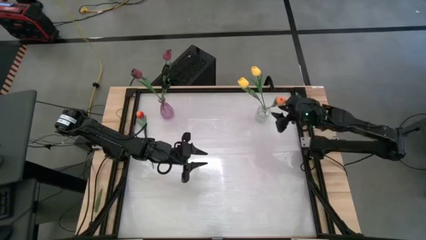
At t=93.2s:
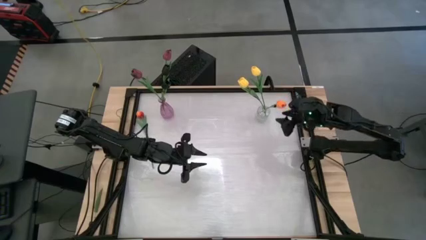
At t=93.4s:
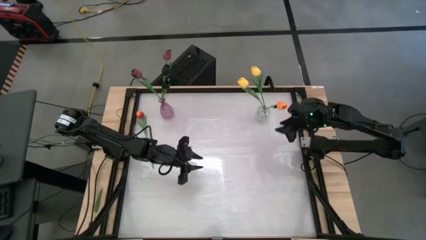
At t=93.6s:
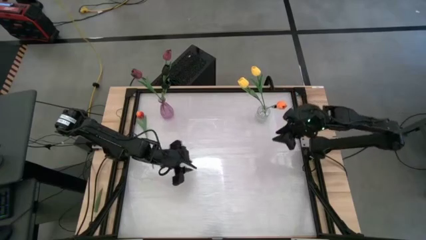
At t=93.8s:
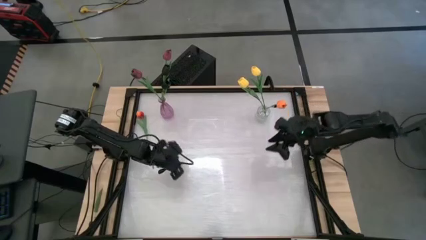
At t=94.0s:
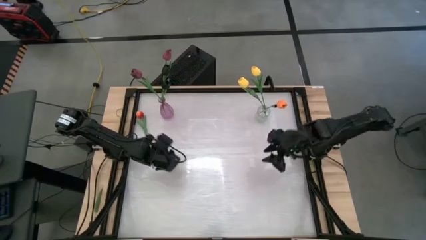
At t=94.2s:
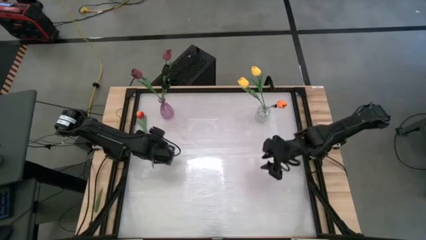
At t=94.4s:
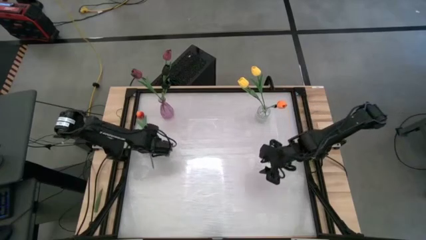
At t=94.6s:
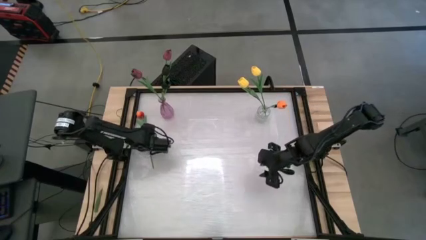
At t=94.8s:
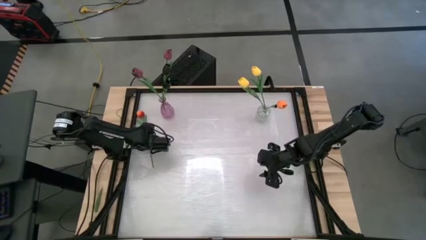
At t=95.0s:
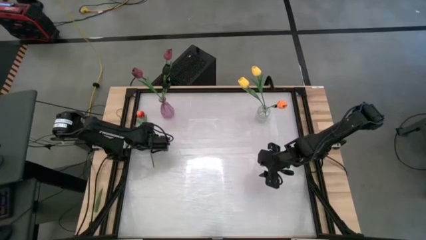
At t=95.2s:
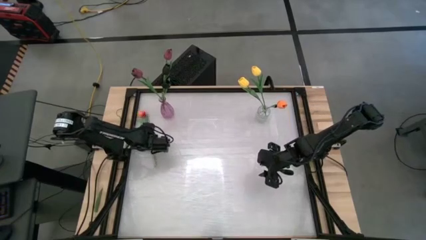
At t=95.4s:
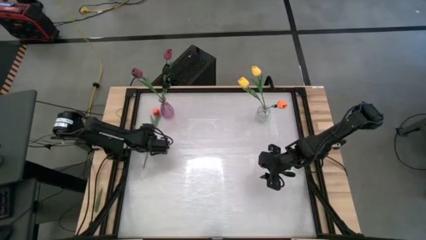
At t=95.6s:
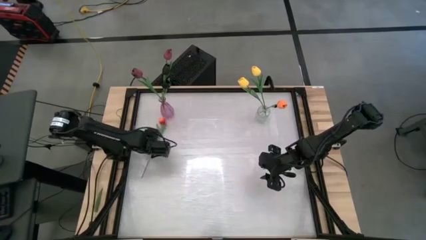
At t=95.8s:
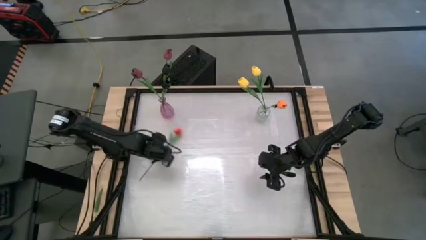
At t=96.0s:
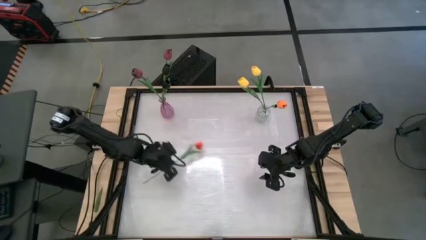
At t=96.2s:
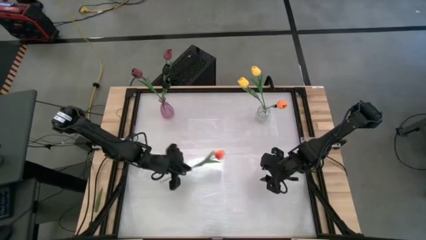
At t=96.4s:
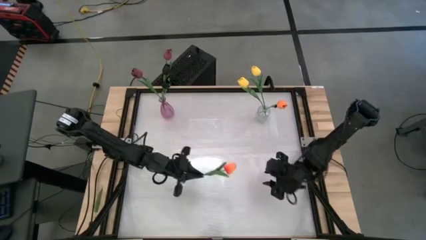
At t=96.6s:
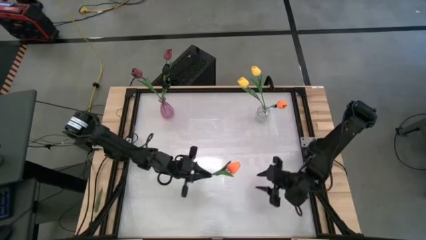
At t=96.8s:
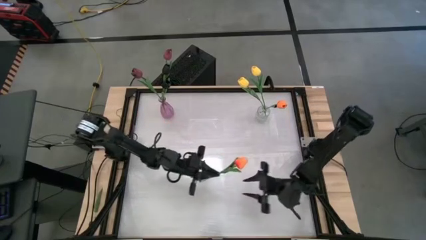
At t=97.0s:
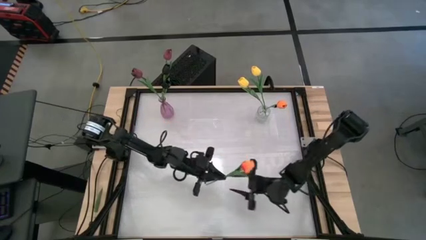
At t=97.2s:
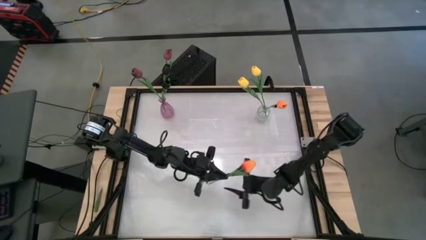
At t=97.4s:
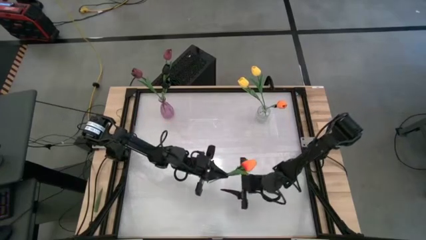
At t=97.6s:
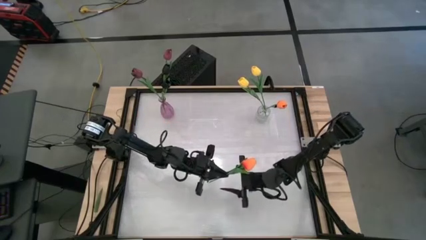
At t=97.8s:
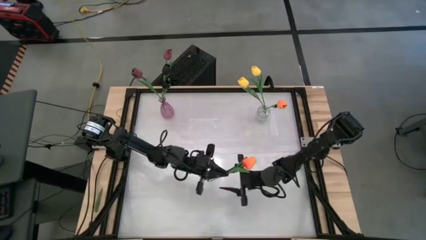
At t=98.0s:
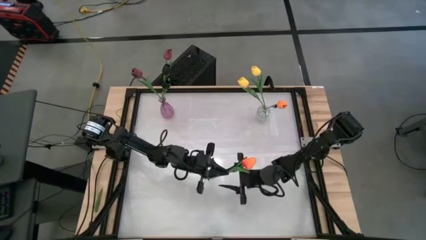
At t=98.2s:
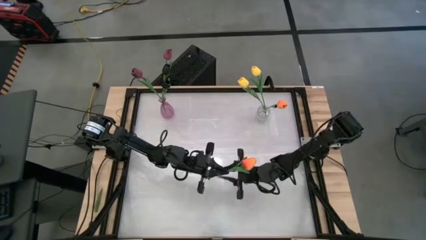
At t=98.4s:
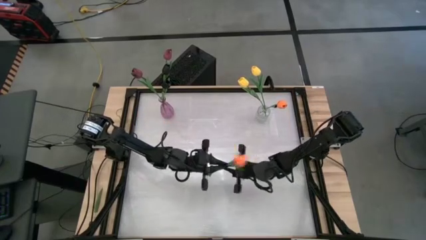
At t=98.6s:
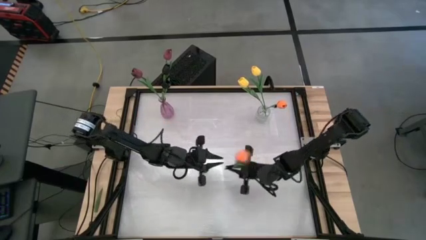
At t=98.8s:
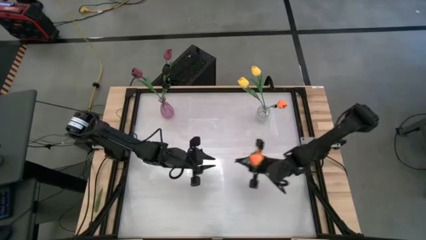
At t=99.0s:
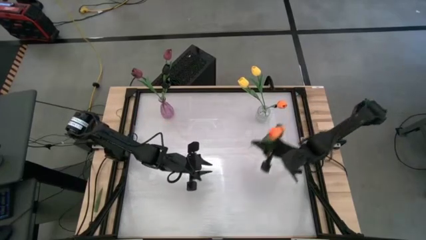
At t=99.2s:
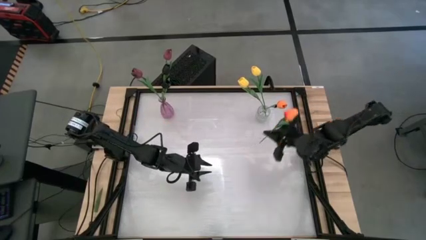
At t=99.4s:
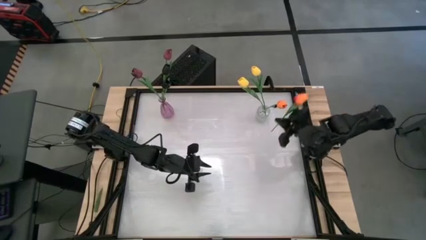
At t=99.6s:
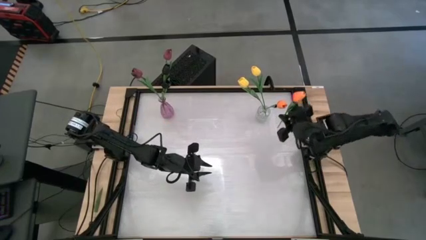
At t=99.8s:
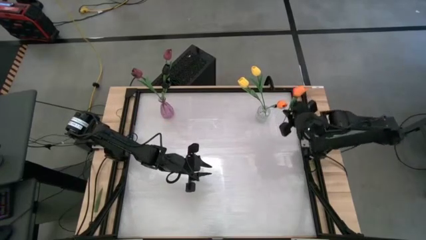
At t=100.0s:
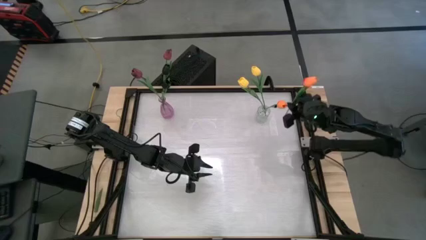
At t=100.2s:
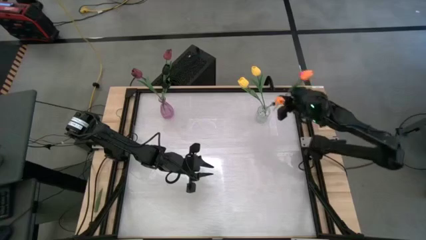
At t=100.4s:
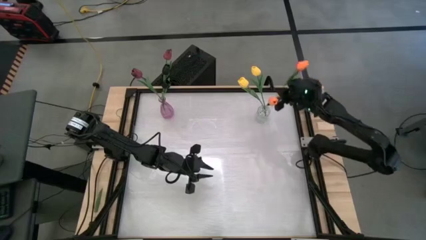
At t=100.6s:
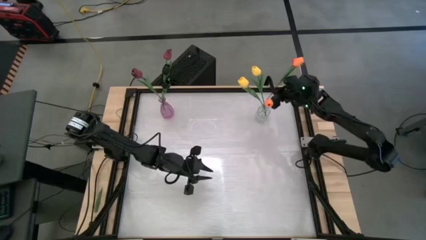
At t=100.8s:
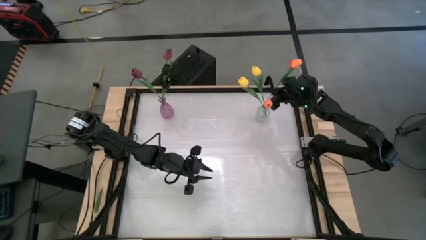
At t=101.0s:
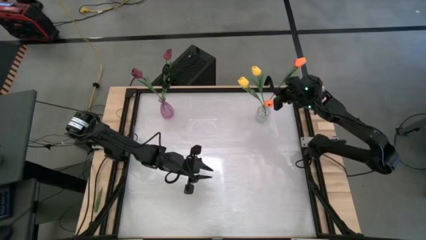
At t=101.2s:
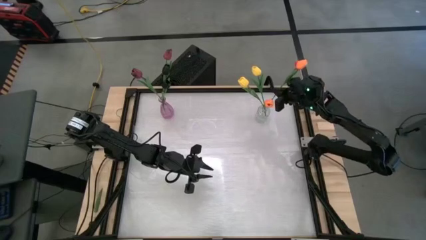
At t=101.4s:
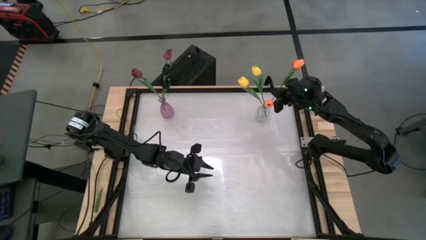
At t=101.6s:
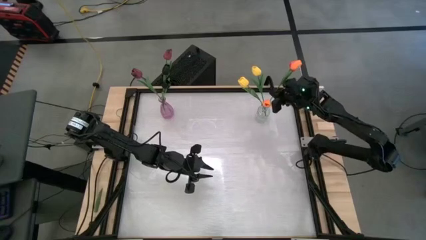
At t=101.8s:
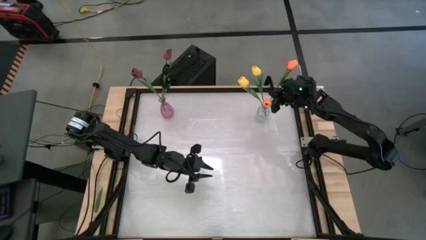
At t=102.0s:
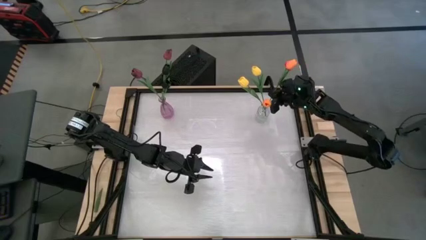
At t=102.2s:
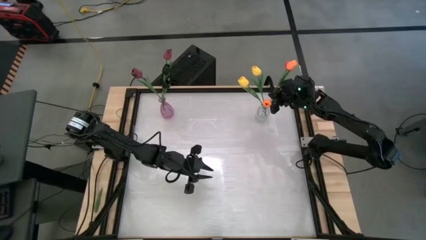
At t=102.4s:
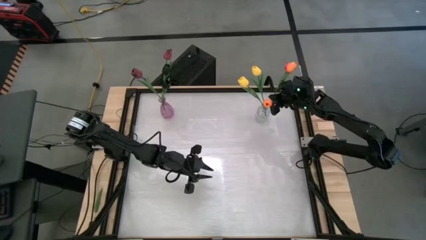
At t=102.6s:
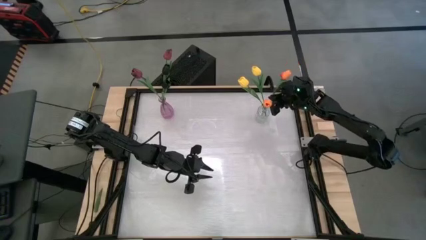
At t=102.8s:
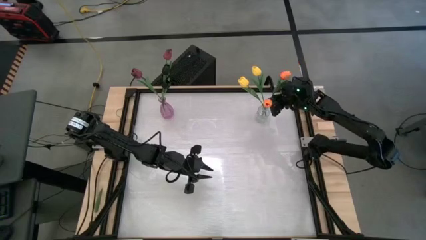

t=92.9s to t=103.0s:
Task: Sort flowers into vase by color
Put the orange tulip into the transparent vase

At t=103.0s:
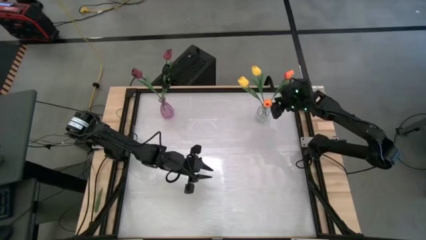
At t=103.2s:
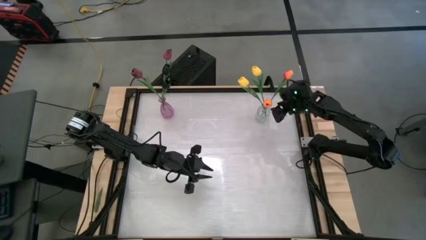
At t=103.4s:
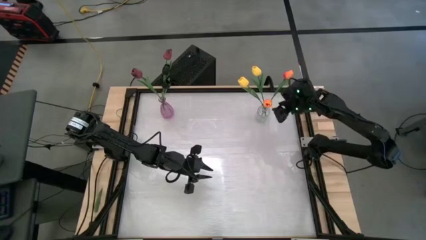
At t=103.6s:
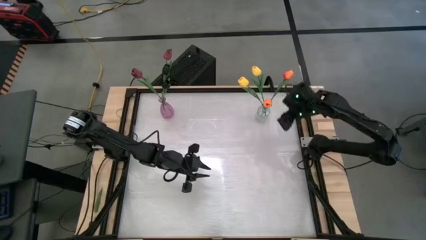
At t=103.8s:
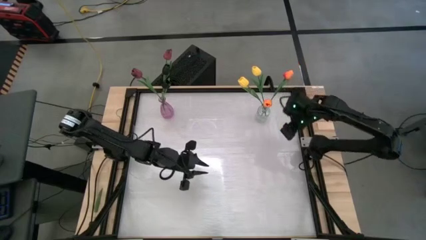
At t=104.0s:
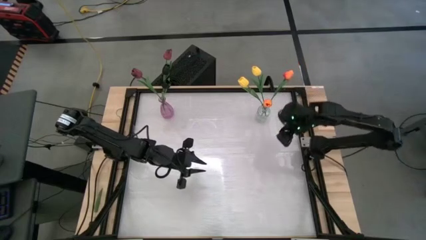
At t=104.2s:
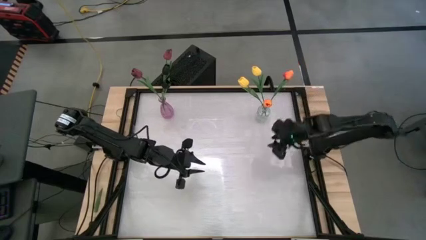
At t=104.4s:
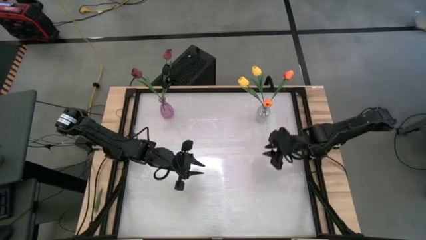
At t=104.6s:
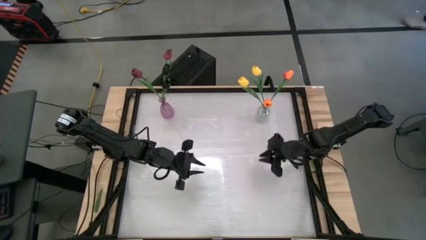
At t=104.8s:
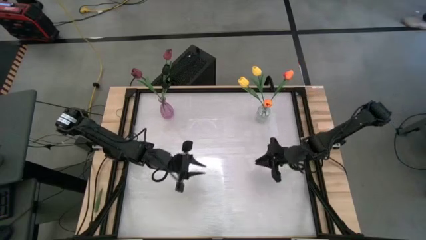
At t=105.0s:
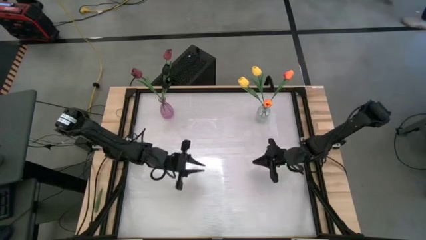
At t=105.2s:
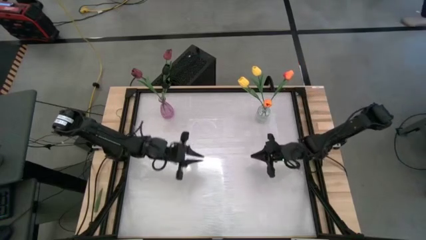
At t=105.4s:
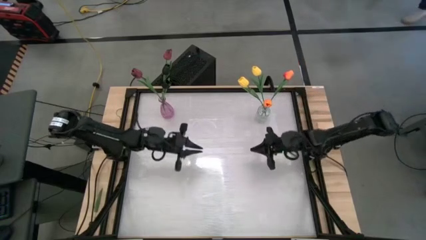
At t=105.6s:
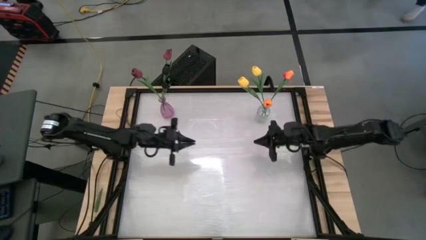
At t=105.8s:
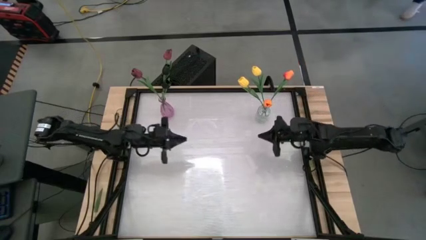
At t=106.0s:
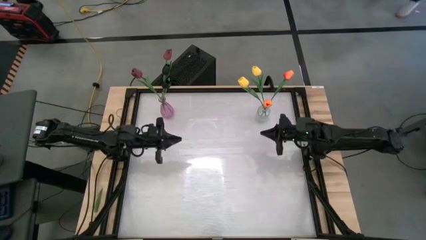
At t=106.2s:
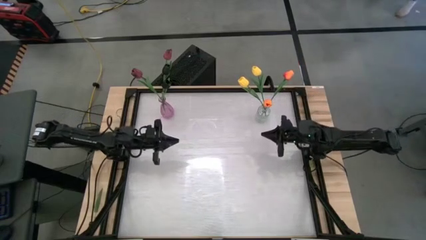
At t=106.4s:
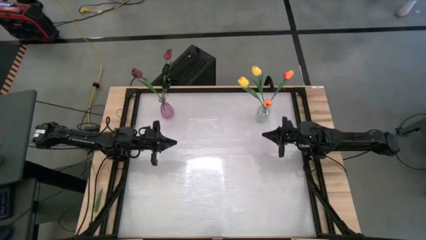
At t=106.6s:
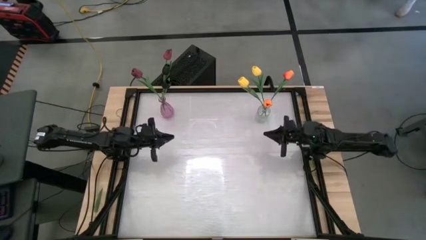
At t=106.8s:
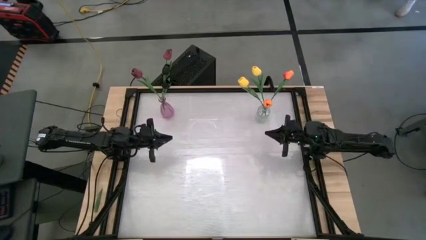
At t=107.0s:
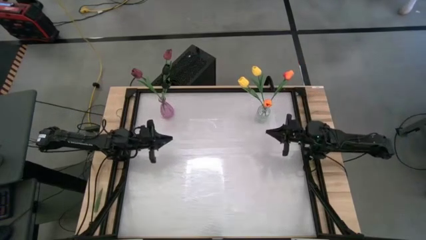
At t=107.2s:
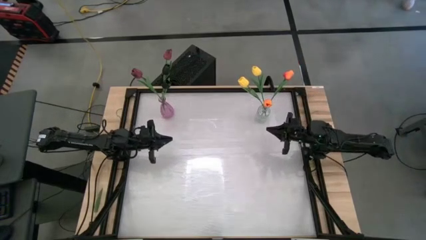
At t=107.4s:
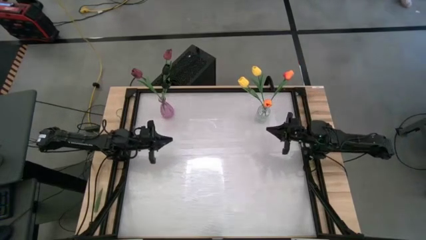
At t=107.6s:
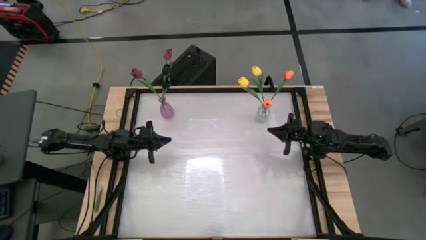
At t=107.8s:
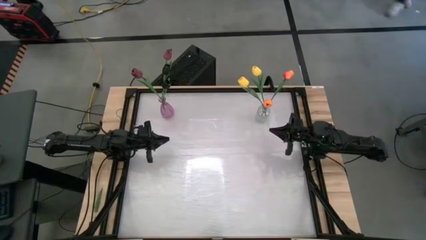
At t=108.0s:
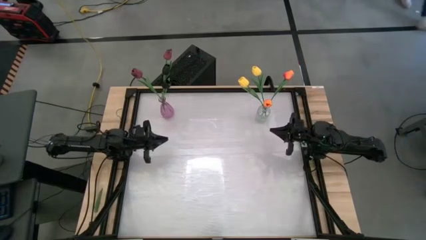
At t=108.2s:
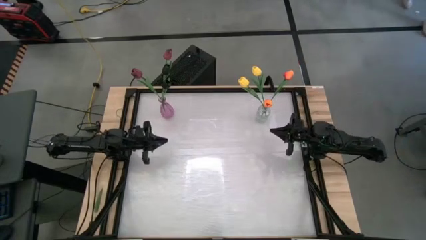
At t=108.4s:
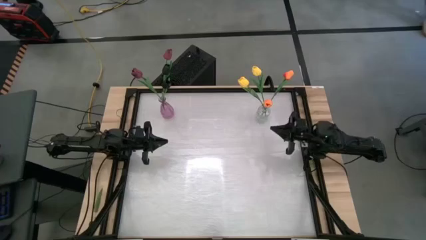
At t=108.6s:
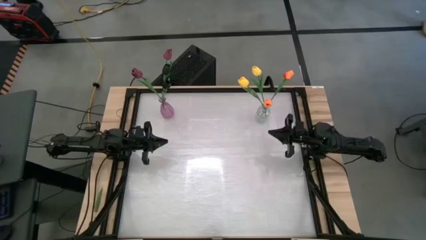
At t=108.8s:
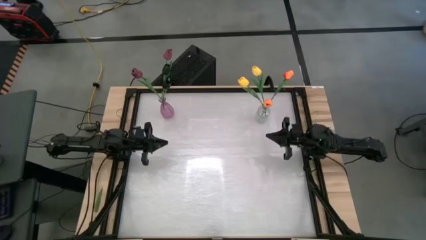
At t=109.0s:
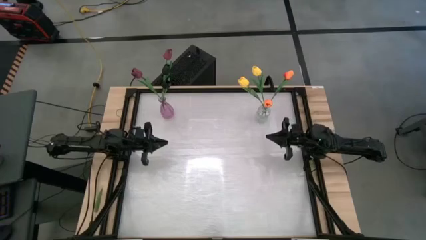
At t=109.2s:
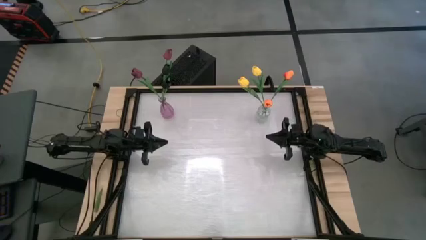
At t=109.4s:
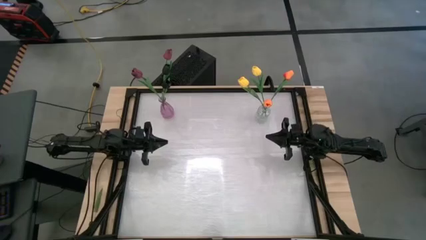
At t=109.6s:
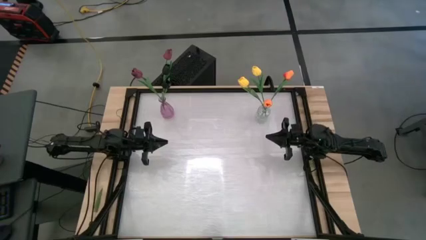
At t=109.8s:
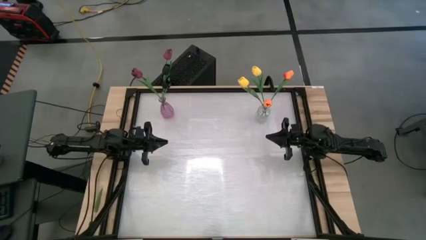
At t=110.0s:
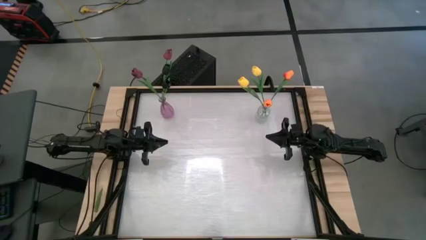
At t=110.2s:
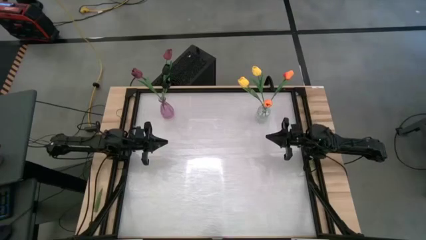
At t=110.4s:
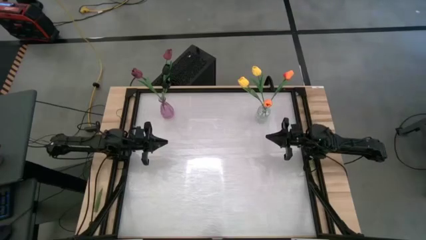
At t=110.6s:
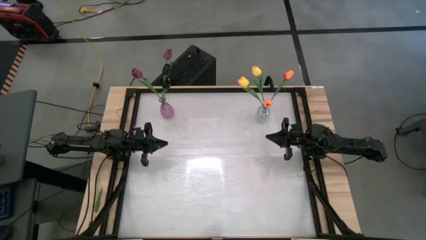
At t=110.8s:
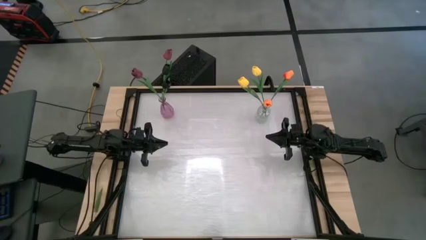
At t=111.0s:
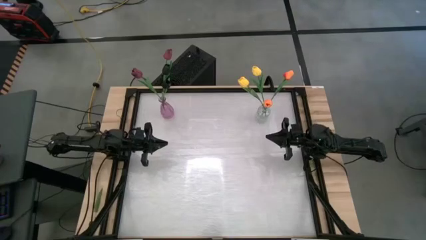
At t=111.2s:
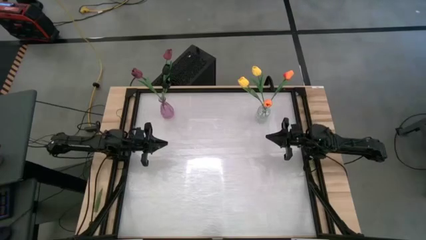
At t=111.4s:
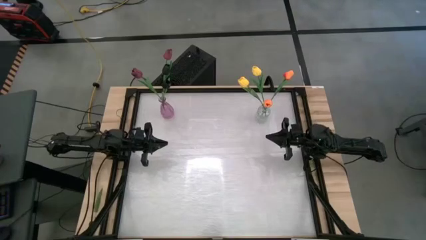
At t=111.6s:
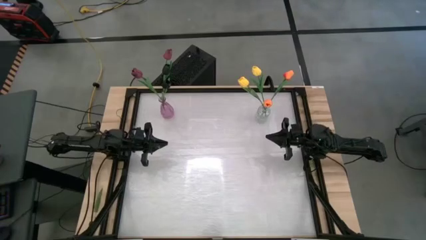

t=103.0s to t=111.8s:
Return to Home Position
